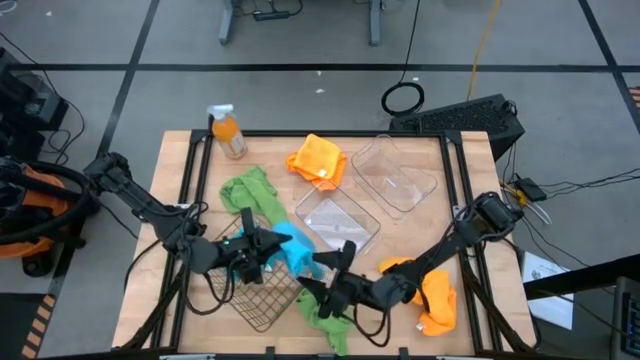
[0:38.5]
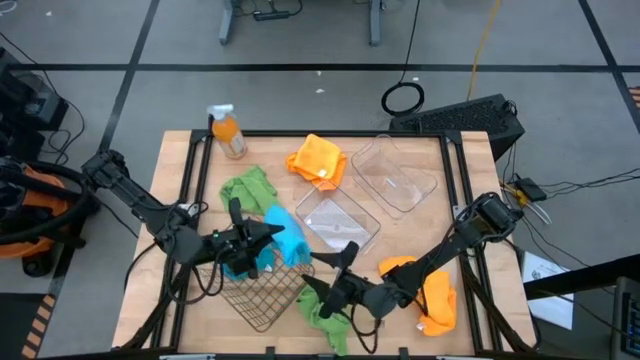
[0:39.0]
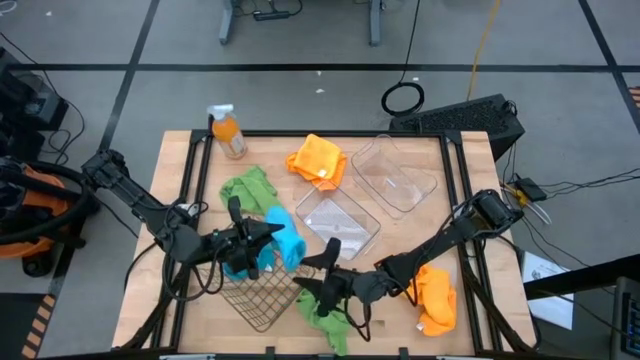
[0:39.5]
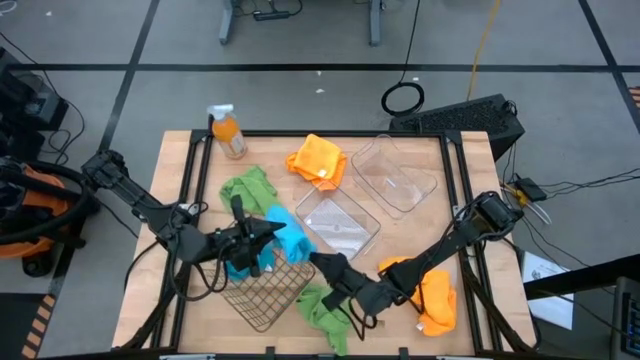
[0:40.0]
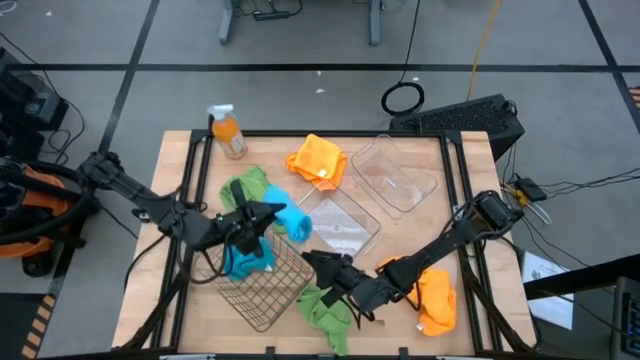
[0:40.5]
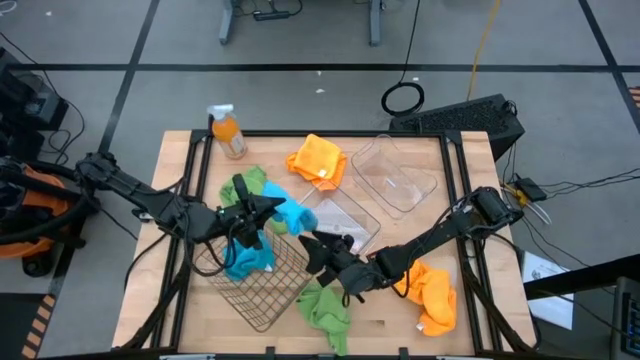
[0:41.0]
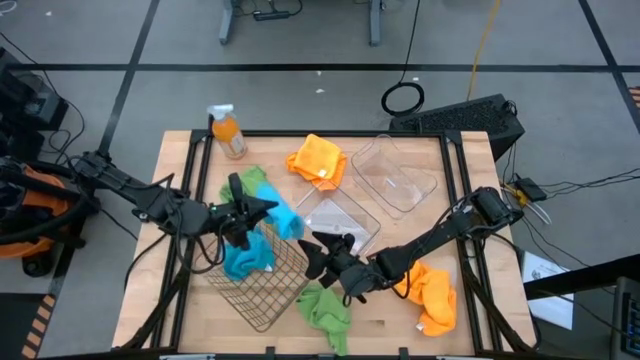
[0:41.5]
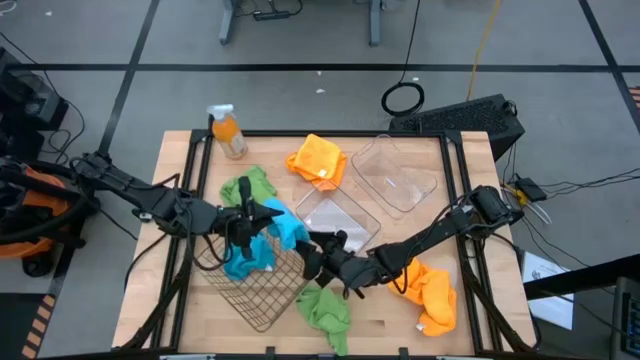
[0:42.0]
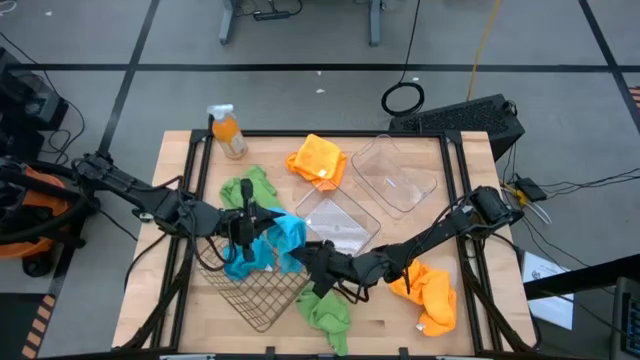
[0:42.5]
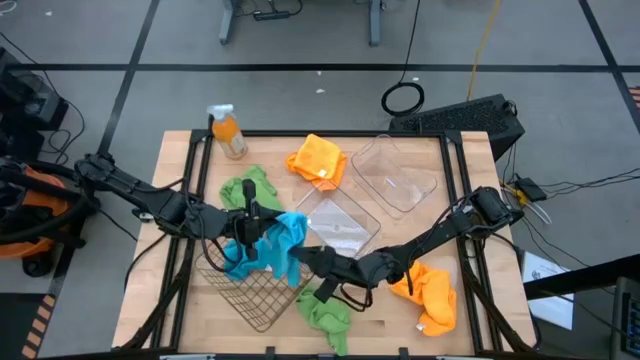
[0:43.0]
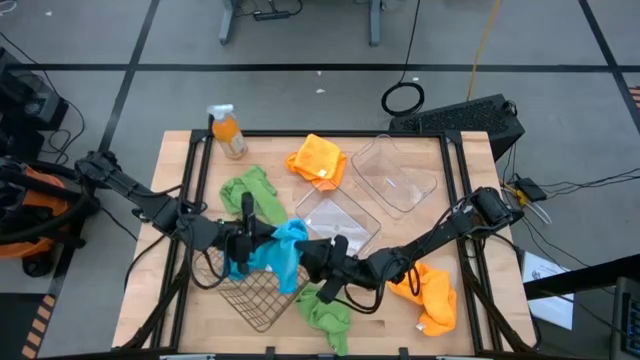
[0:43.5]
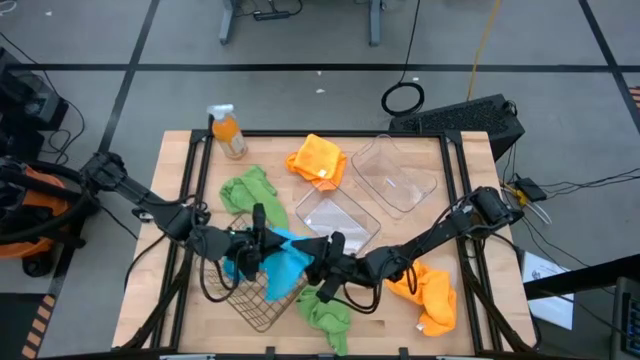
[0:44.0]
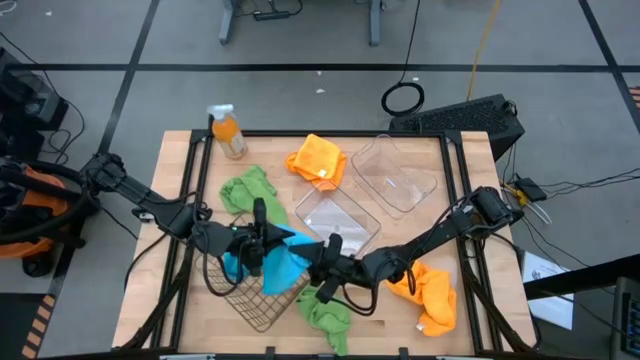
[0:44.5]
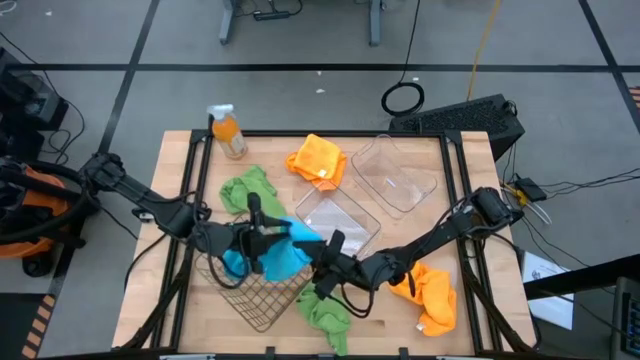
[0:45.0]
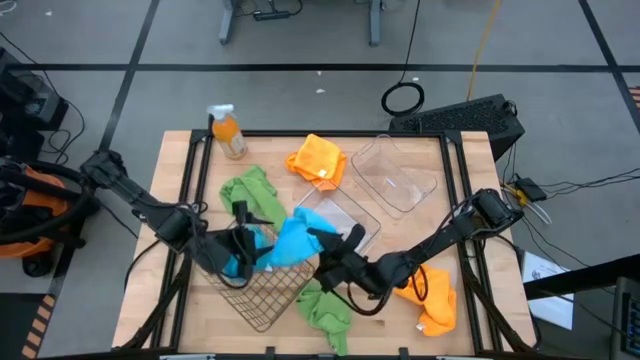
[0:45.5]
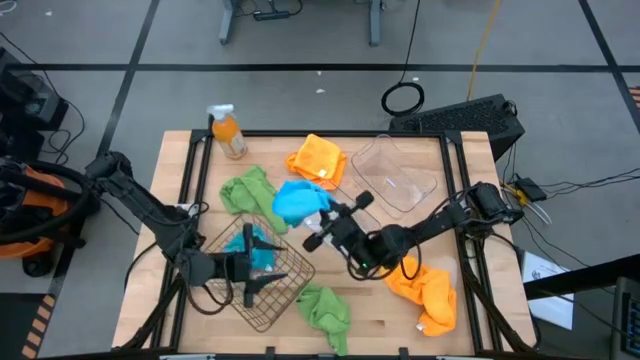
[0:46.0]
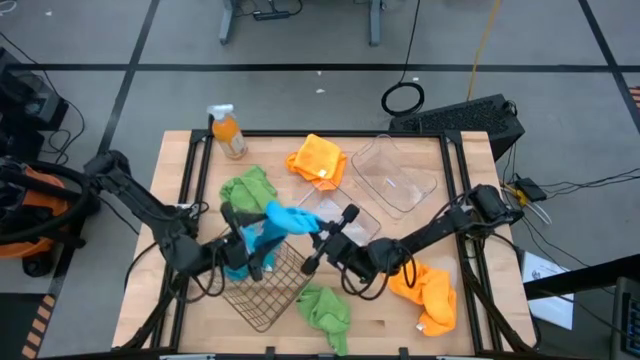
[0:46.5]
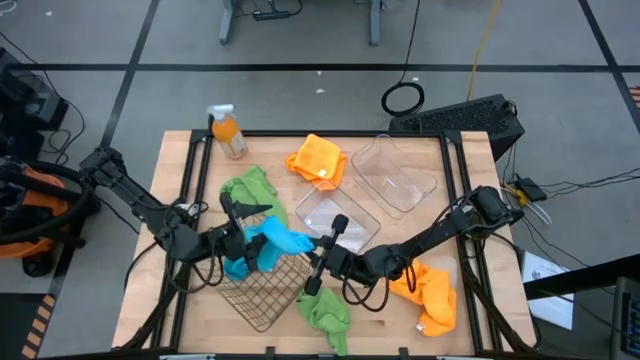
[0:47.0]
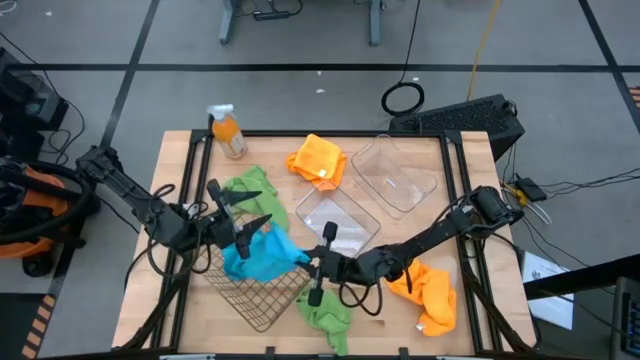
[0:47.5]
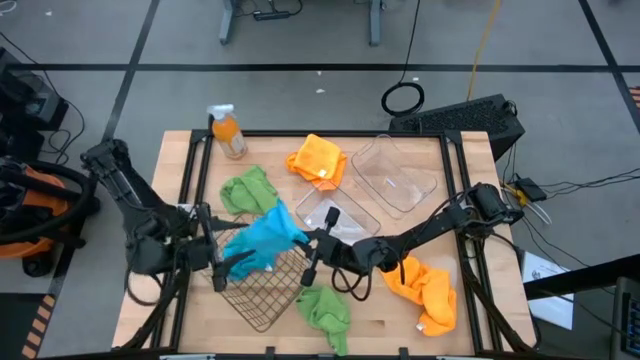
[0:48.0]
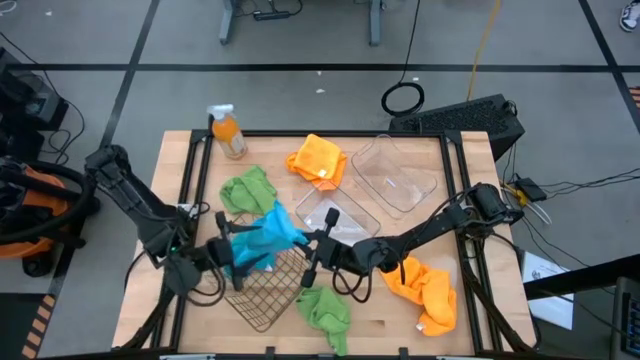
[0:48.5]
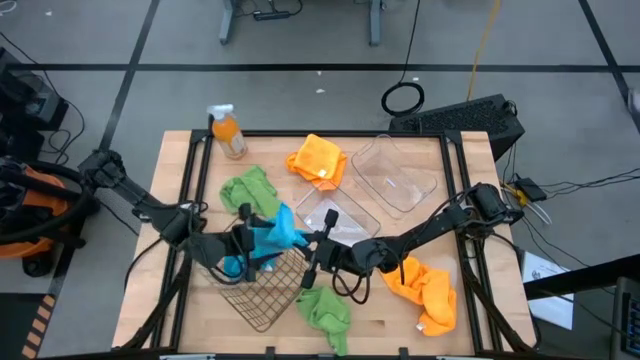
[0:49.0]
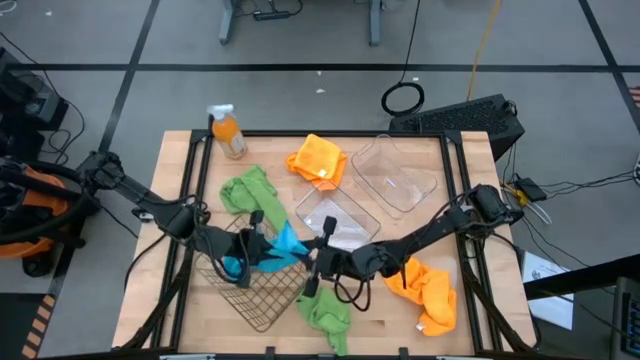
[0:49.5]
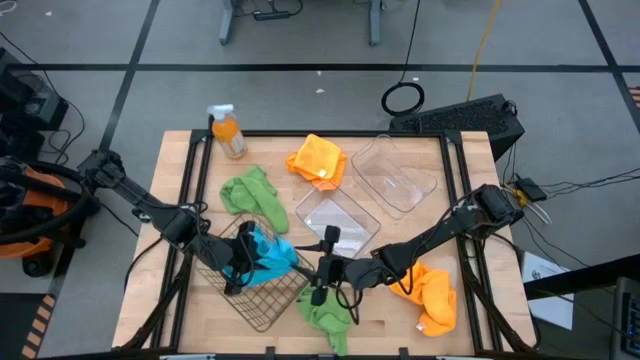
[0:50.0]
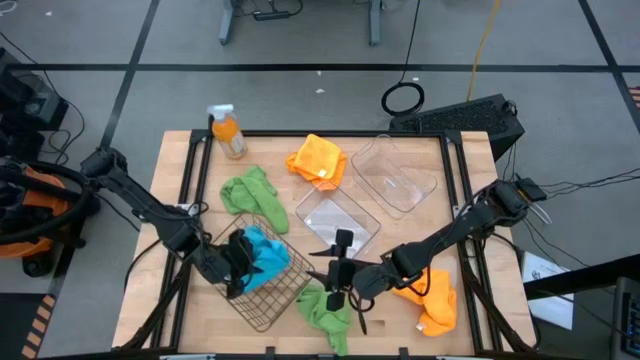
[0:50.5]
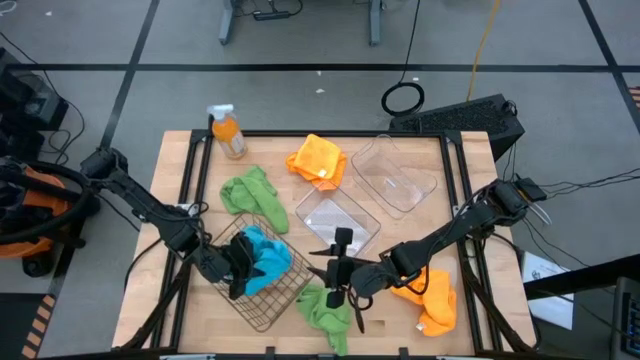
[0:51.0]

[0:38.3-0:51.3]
Task: Sort microfiber towel by color & place in baskets
Put the blue microfiber towel into the wire basket
